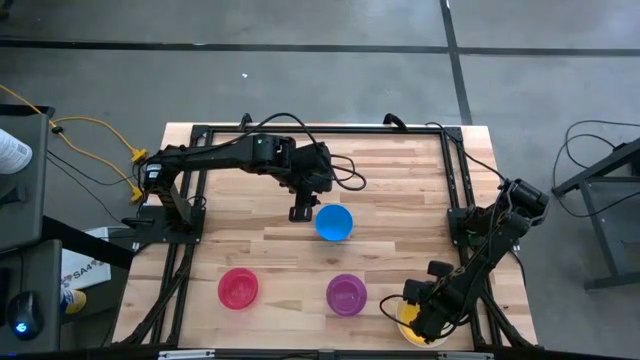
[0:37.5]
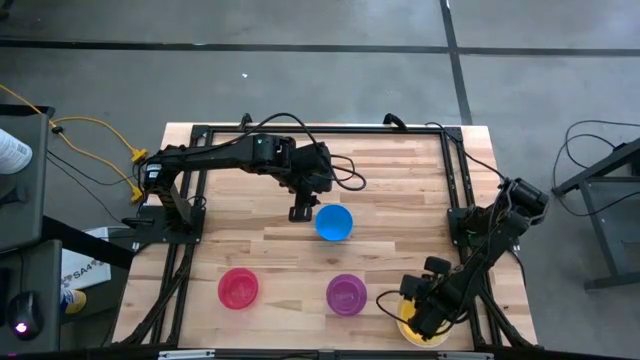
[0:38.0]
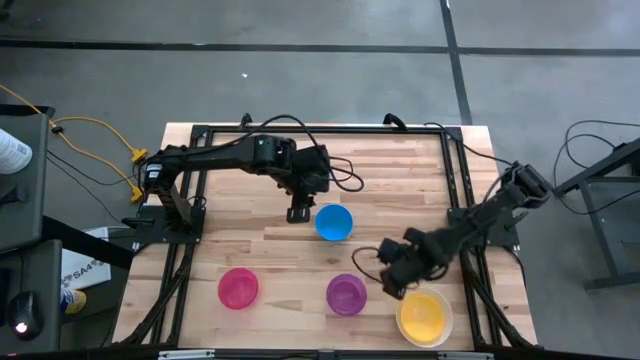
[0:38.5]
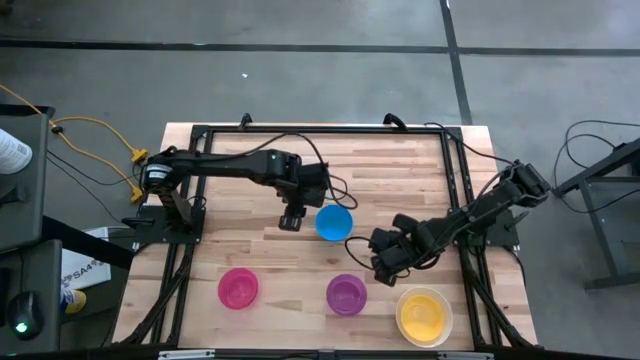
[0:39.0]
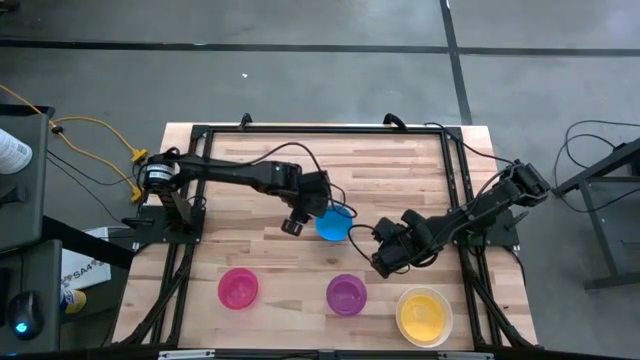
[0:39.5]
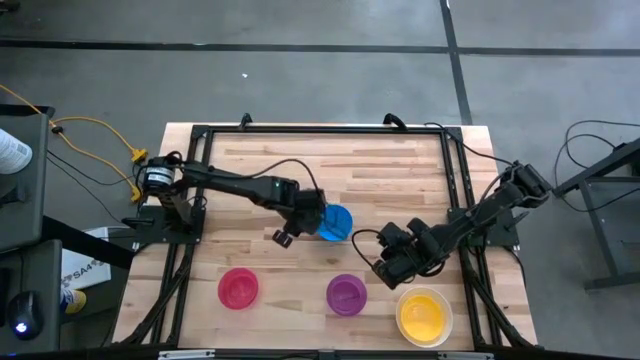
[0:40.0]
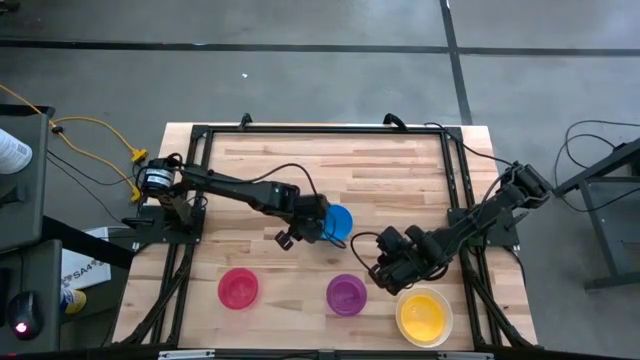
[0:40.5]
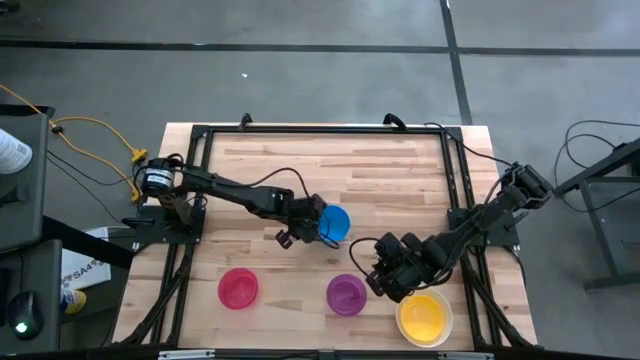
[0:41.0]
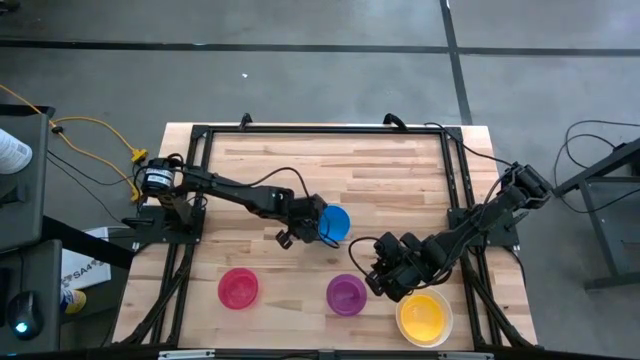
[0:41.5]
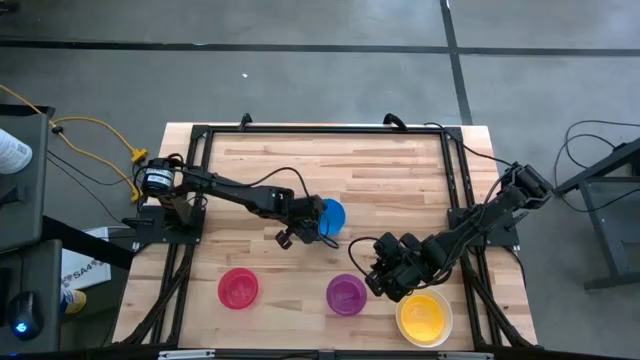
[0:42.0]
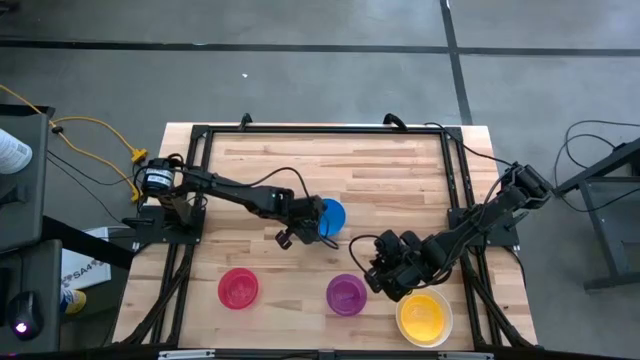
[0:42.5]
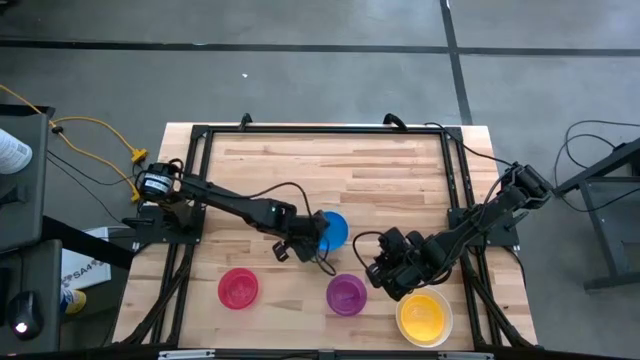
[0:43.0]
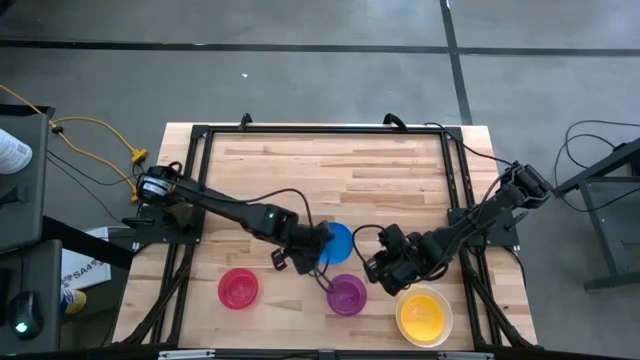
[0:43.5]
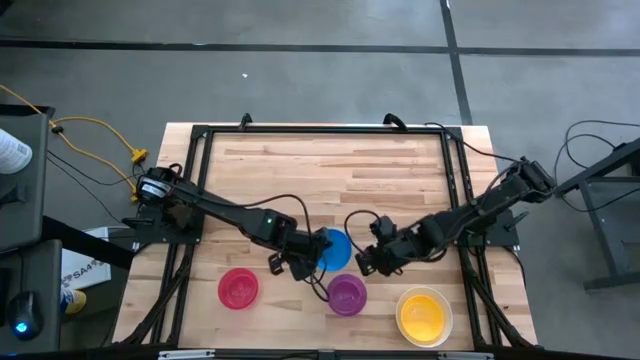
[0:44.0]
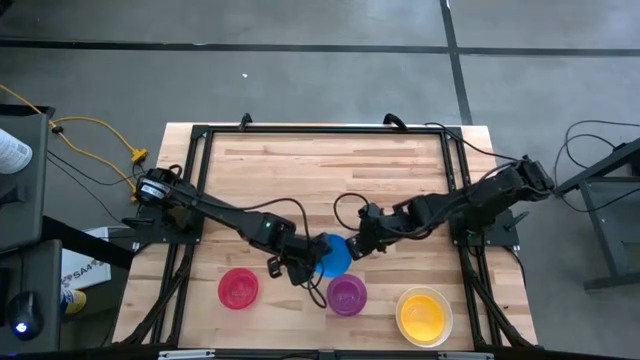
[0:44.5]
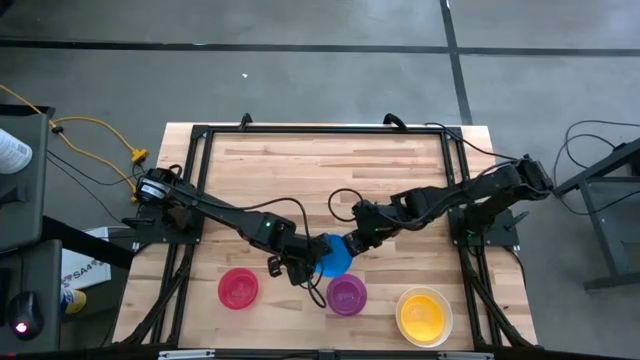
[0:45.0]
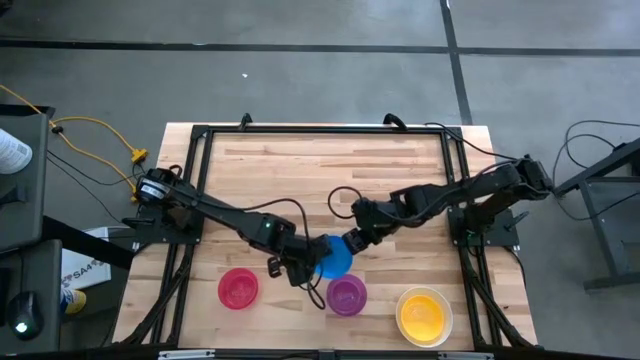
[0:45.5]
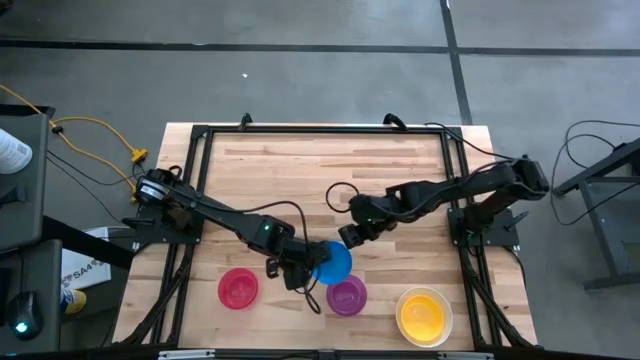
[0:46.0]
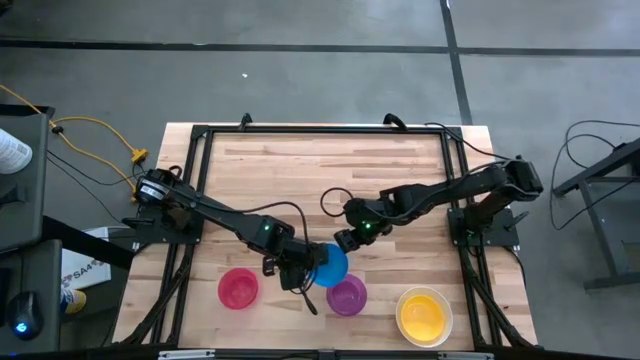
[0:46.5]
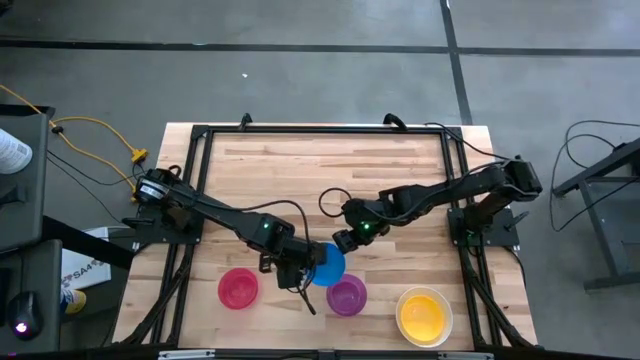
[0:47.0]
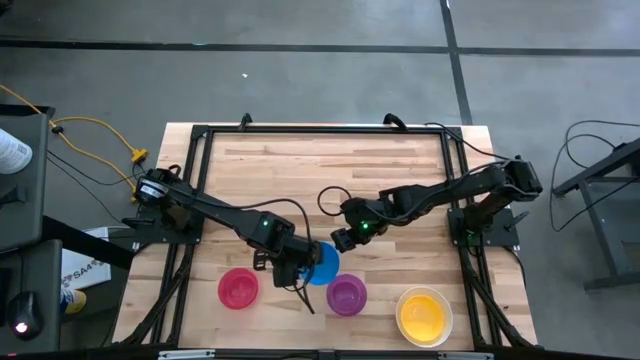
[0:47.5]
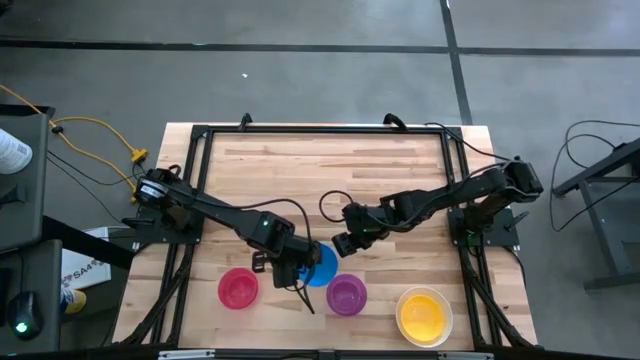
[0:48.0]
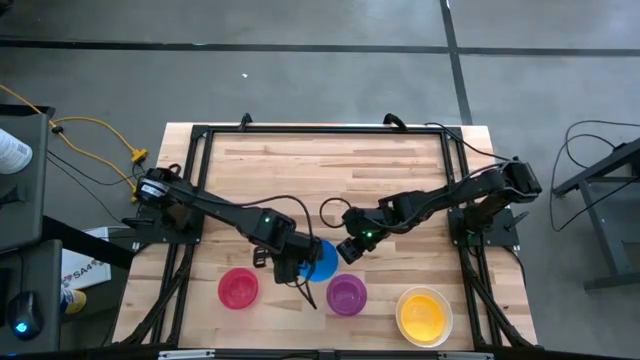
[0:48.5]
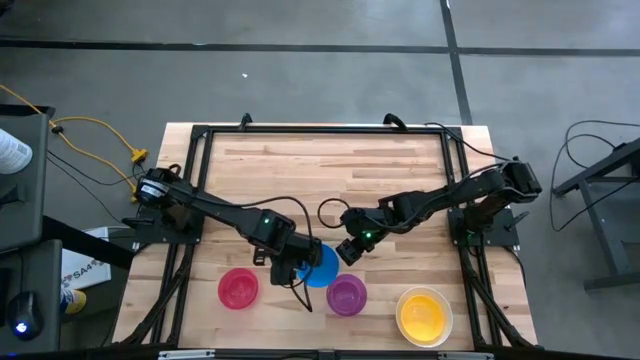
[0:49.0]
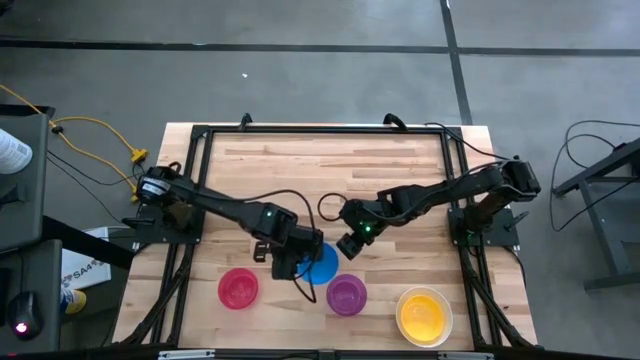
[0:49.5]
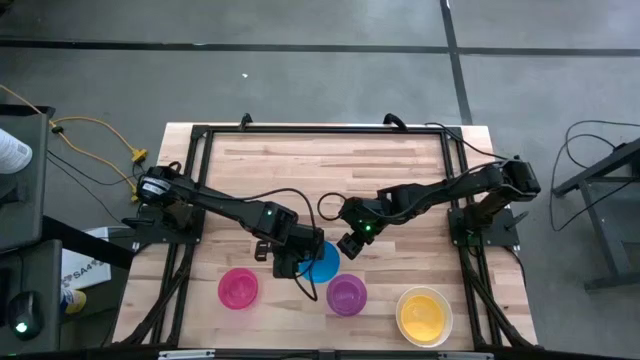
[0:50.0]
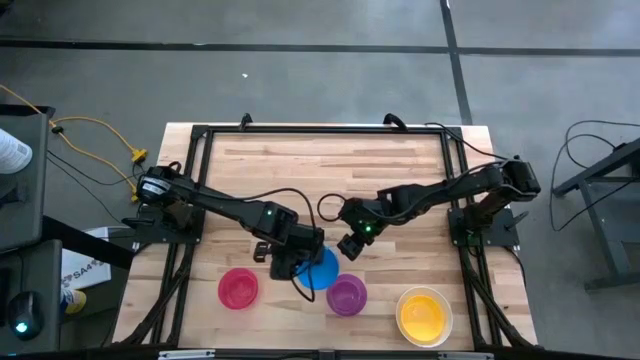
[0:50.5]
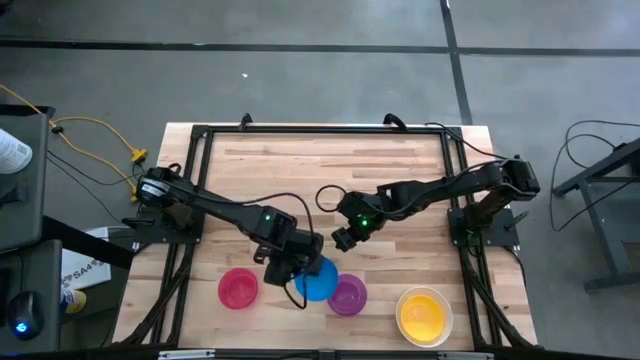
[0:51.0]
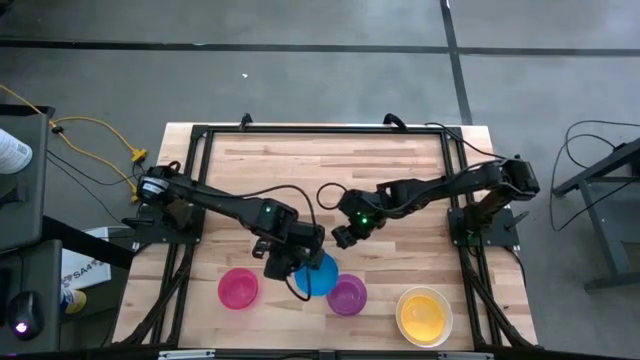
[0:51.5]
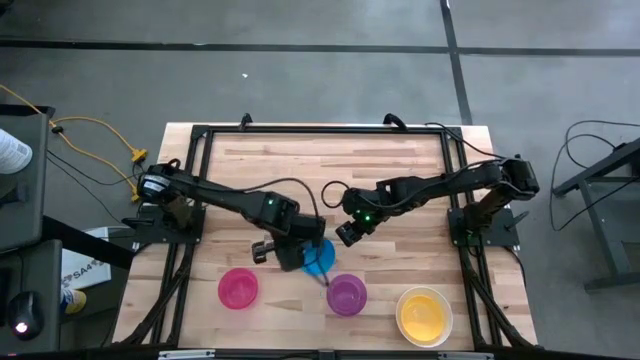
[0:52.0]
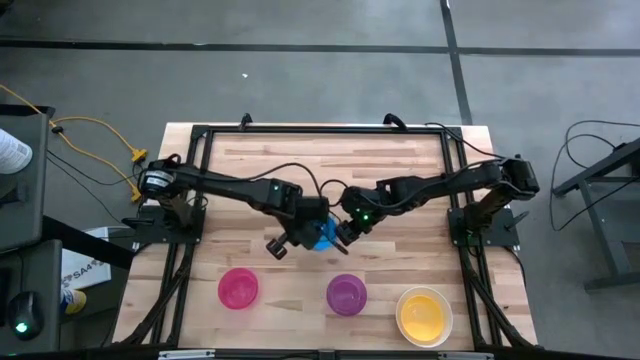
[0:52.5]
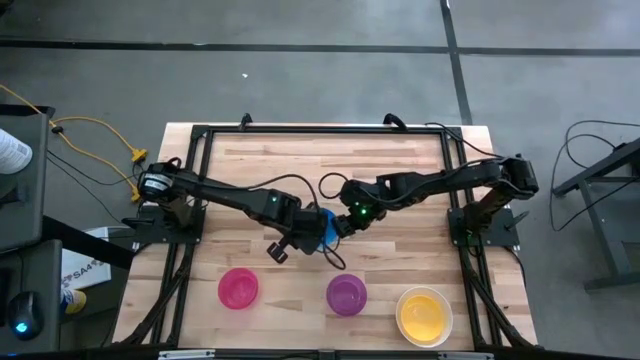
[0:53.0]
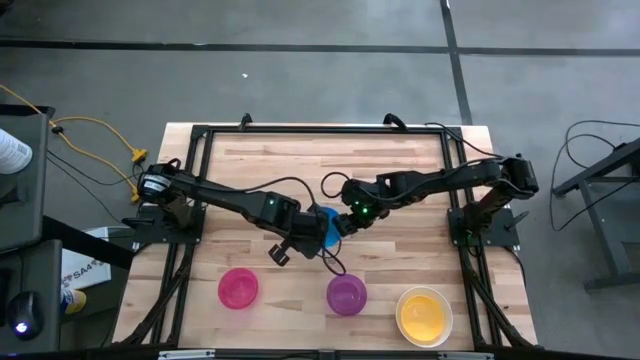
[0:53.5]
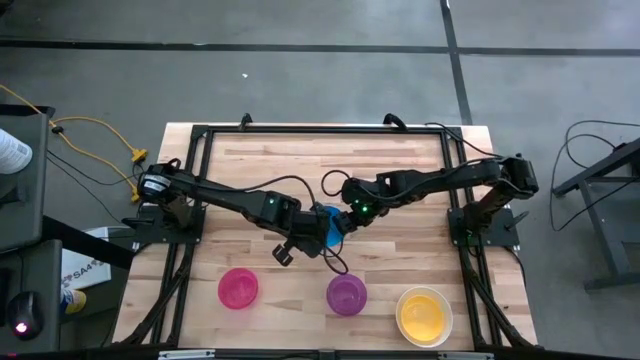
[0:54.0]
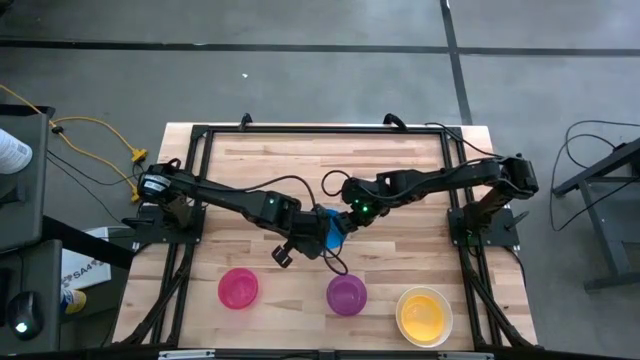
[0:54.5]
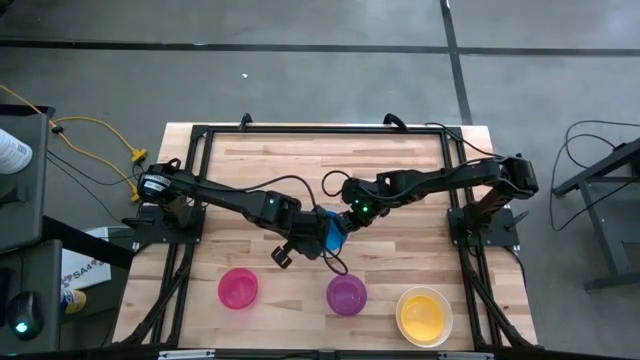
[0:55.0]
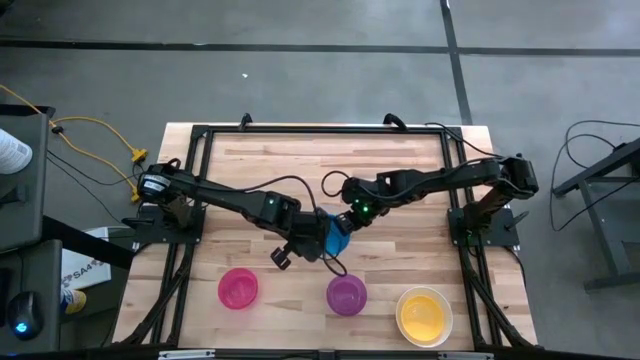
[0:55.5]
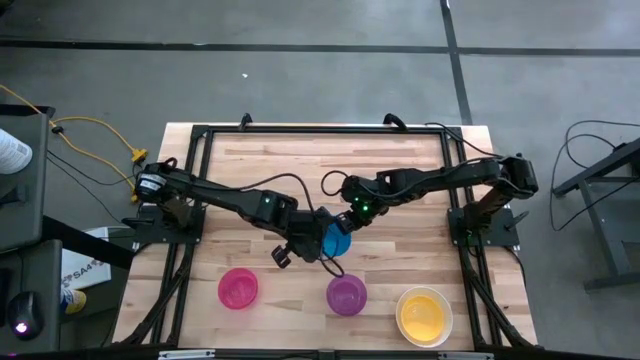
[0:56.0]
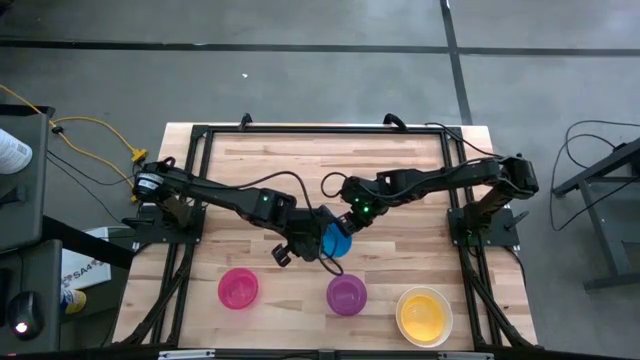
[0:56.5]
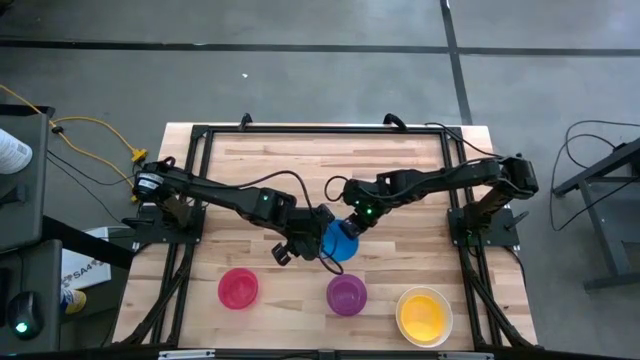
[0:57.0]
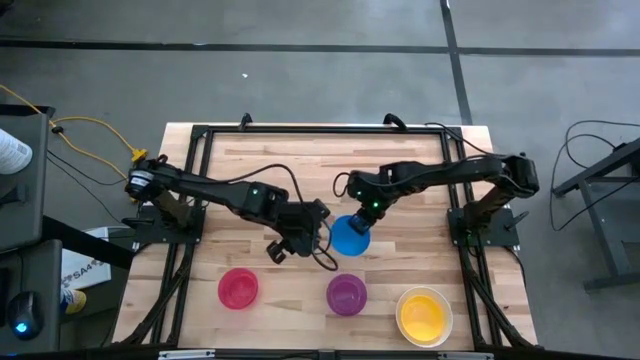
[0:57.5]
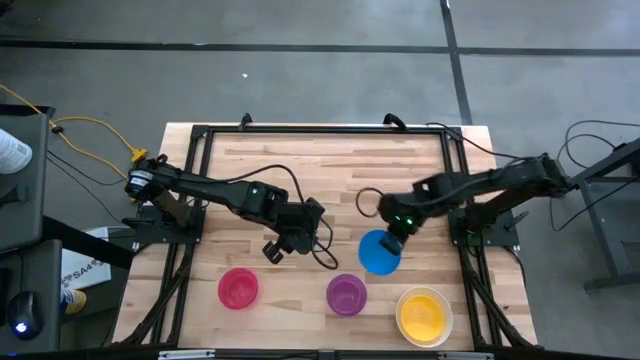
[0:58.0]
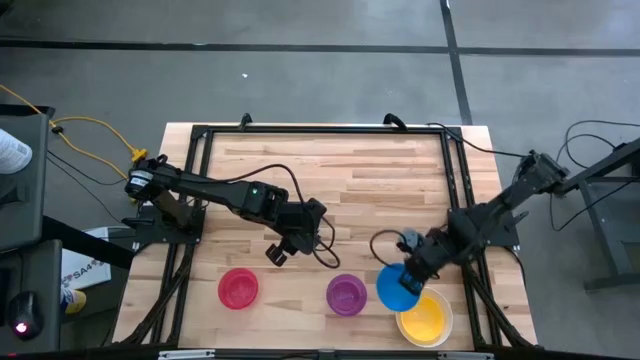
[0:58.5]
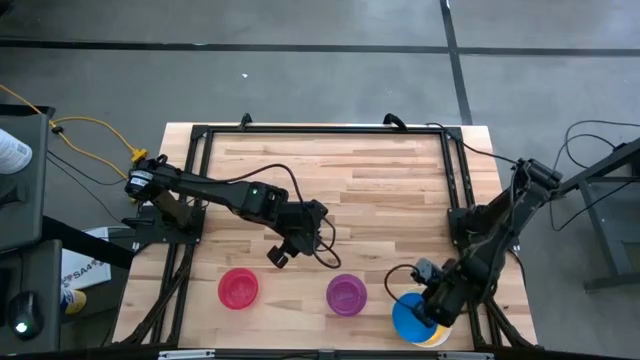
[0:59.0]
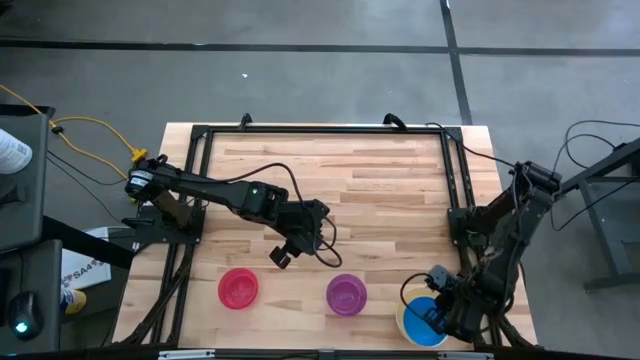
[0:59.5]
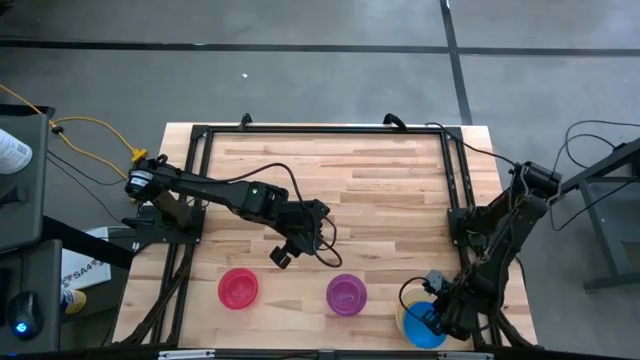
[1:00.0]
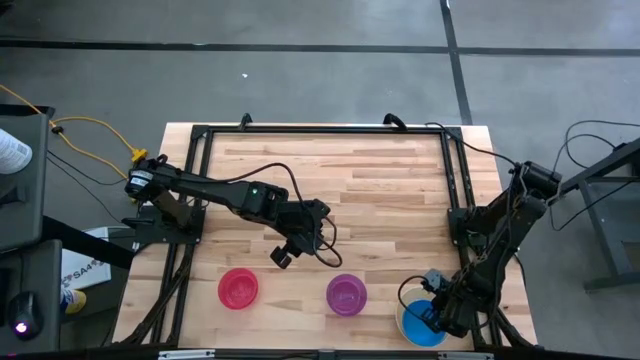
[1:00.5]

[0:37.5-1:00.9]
Stack the blue bowl on the yellow bowl
